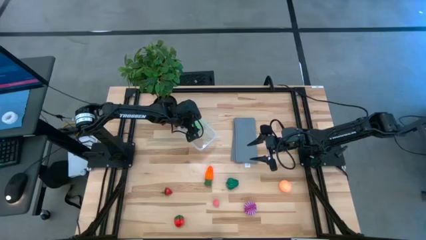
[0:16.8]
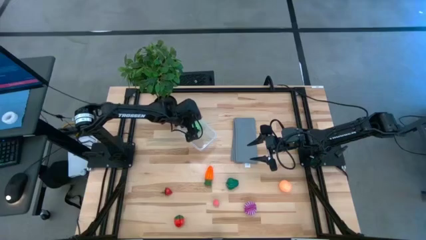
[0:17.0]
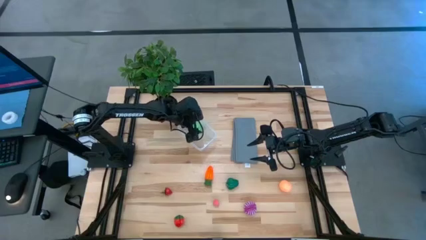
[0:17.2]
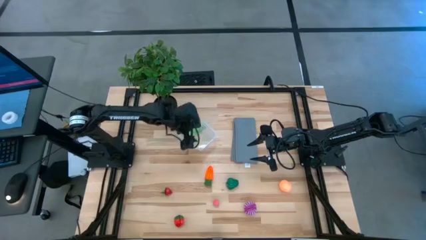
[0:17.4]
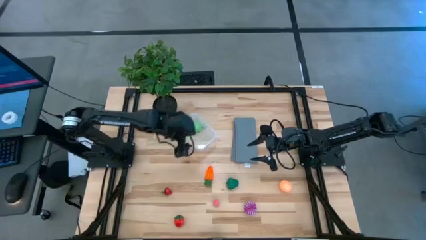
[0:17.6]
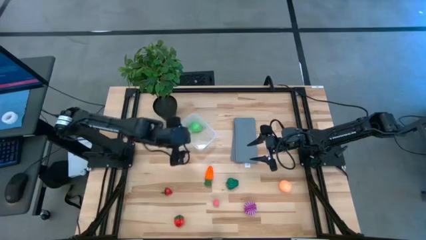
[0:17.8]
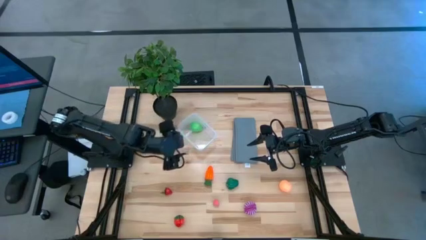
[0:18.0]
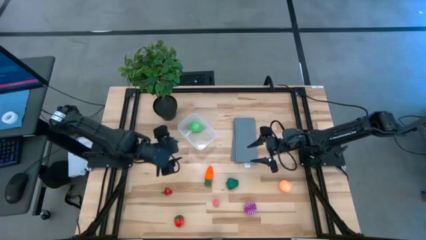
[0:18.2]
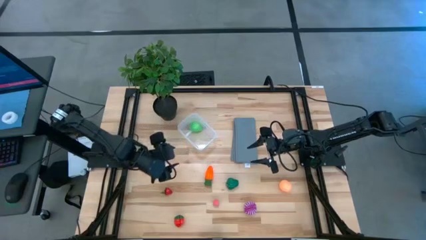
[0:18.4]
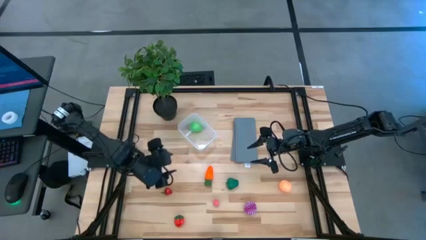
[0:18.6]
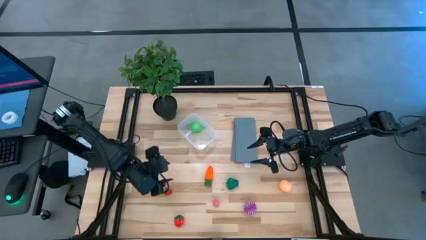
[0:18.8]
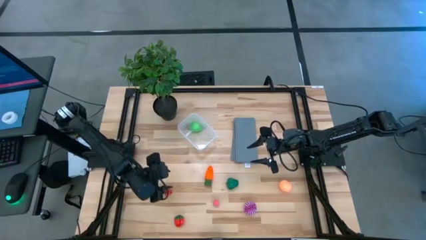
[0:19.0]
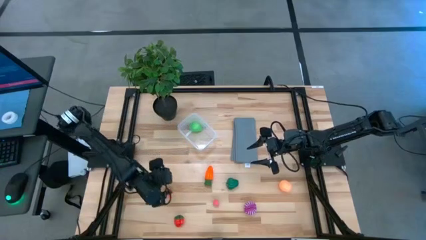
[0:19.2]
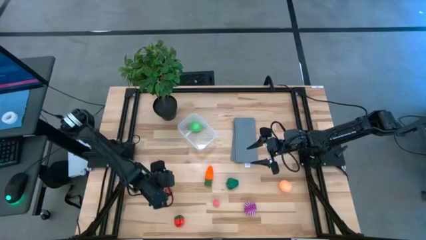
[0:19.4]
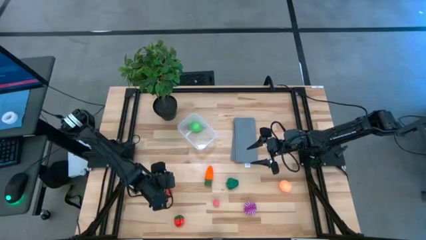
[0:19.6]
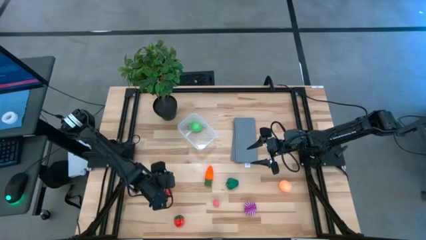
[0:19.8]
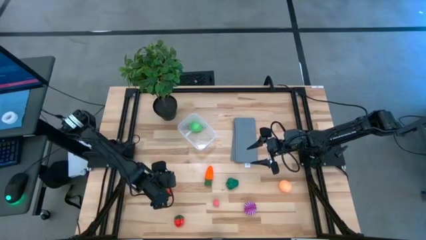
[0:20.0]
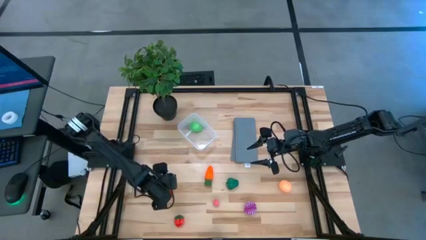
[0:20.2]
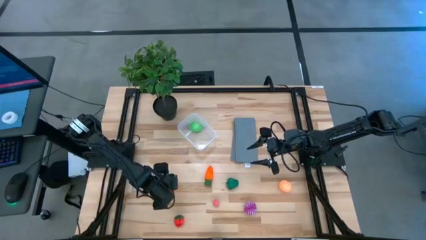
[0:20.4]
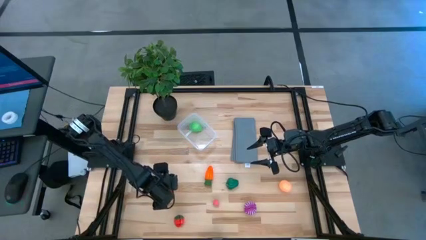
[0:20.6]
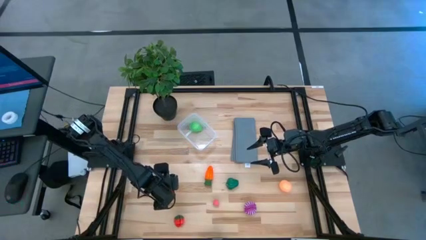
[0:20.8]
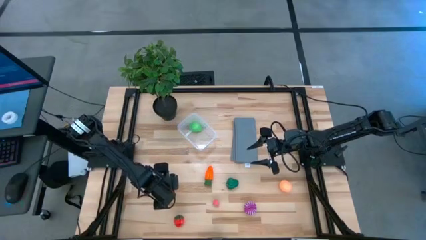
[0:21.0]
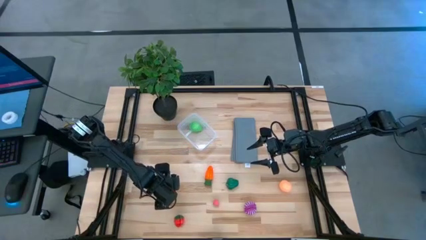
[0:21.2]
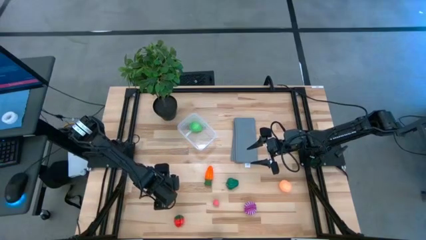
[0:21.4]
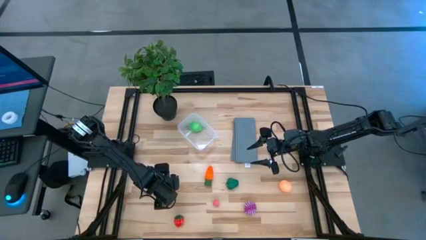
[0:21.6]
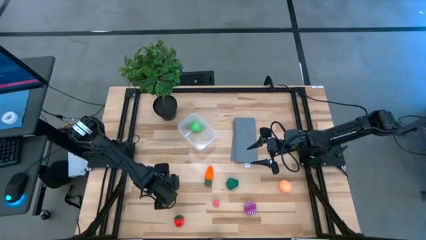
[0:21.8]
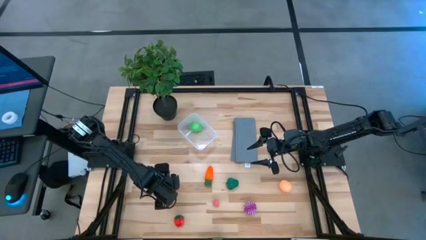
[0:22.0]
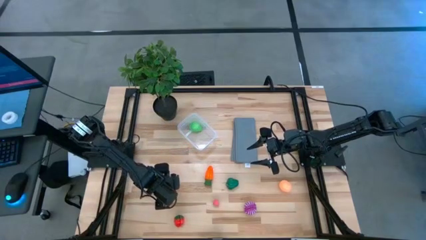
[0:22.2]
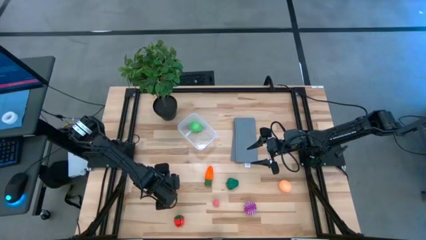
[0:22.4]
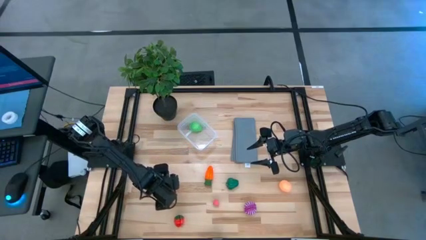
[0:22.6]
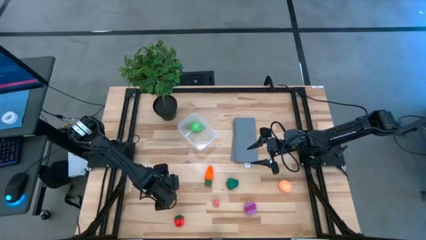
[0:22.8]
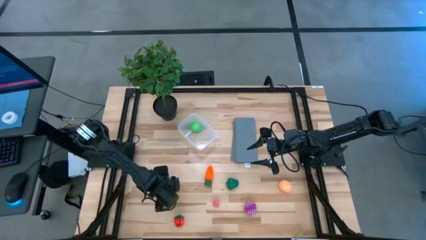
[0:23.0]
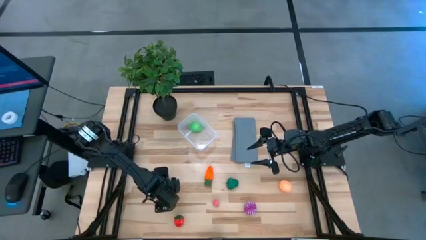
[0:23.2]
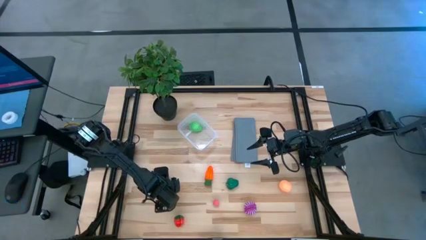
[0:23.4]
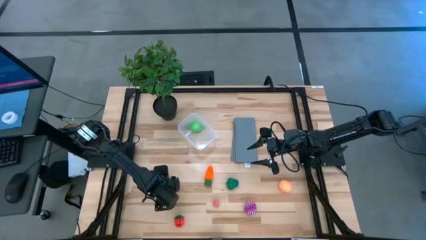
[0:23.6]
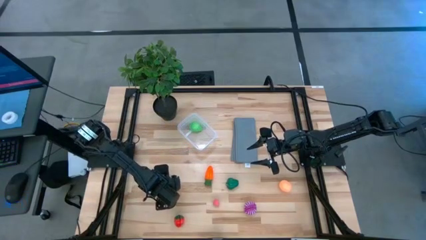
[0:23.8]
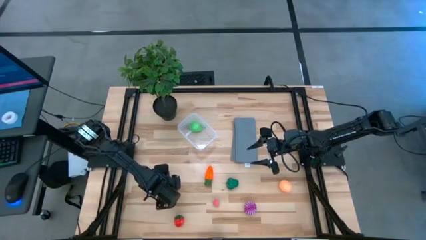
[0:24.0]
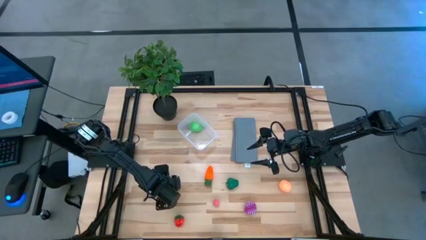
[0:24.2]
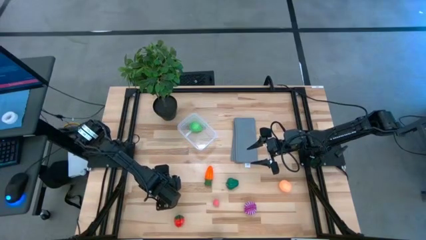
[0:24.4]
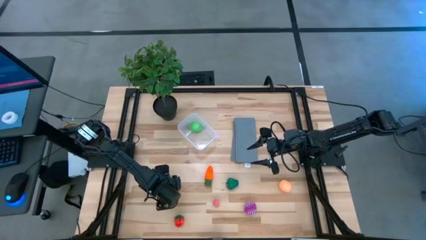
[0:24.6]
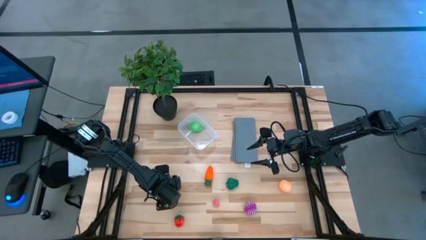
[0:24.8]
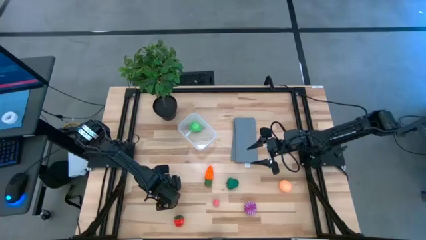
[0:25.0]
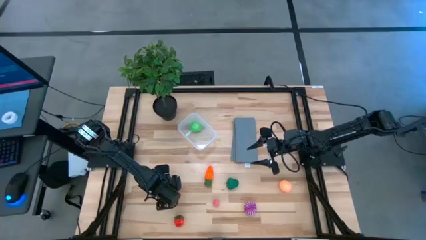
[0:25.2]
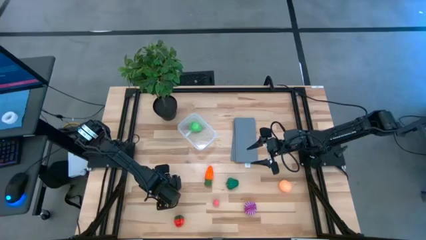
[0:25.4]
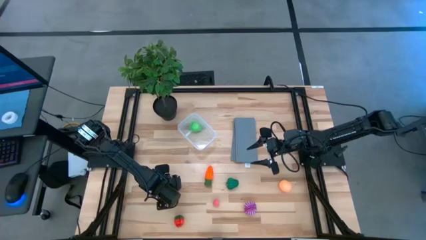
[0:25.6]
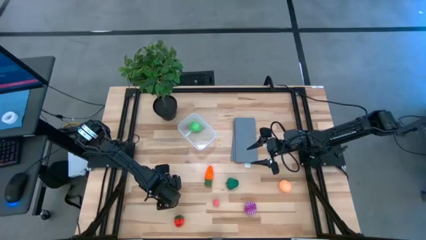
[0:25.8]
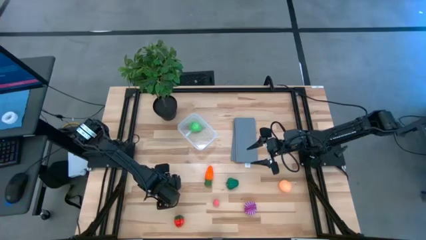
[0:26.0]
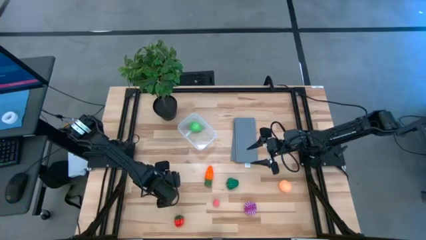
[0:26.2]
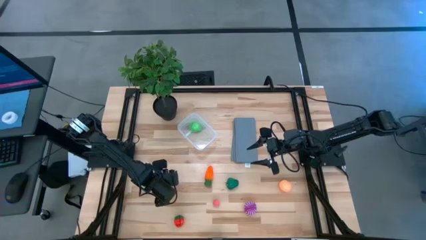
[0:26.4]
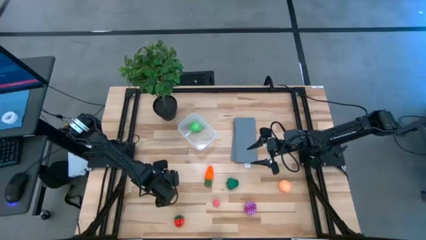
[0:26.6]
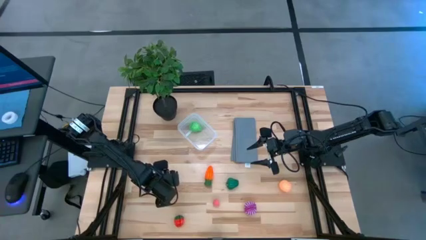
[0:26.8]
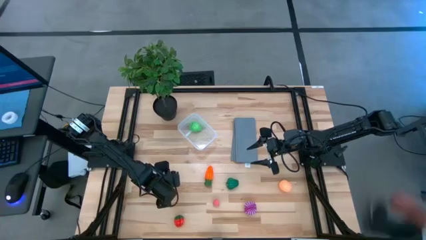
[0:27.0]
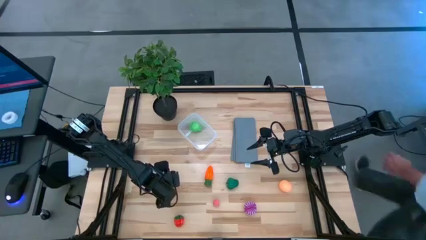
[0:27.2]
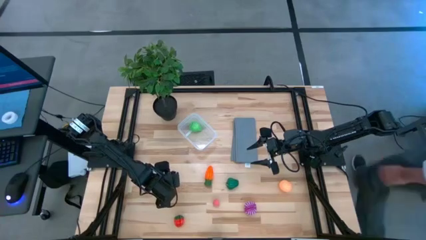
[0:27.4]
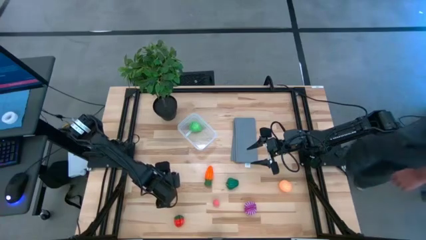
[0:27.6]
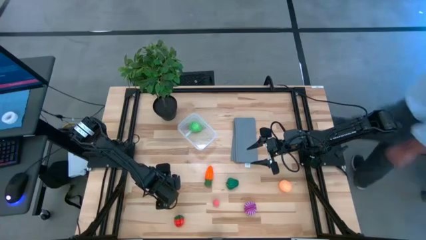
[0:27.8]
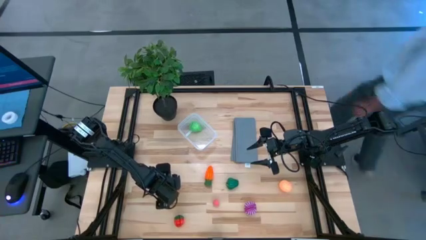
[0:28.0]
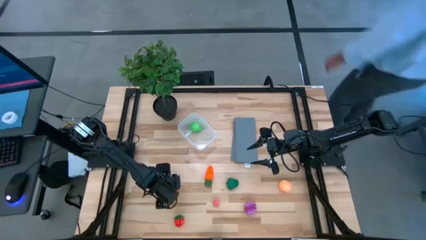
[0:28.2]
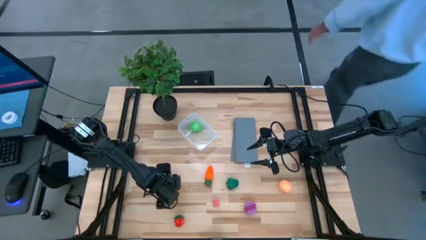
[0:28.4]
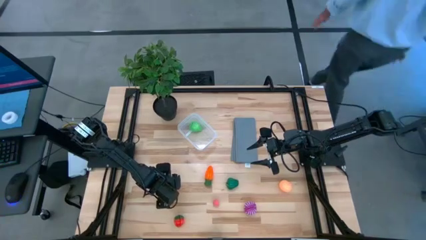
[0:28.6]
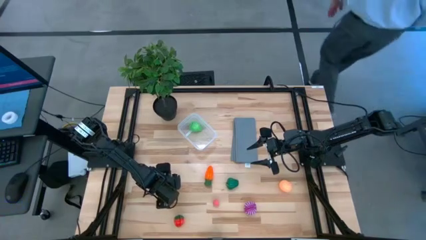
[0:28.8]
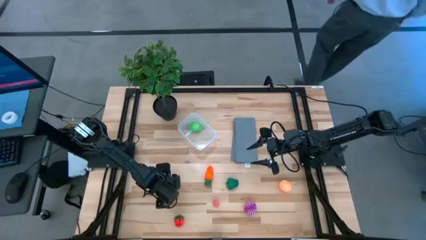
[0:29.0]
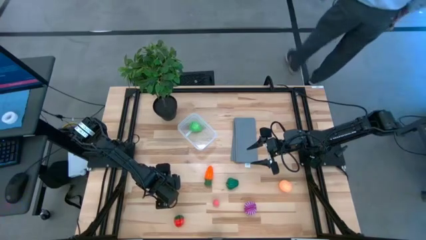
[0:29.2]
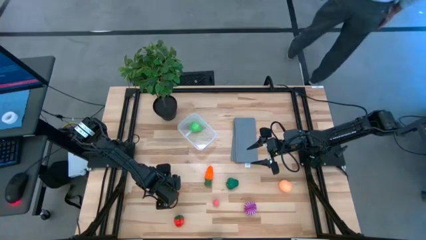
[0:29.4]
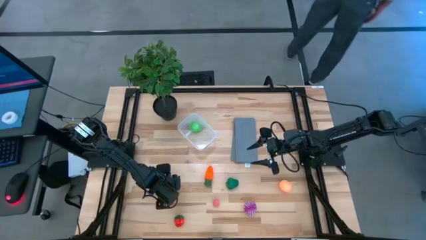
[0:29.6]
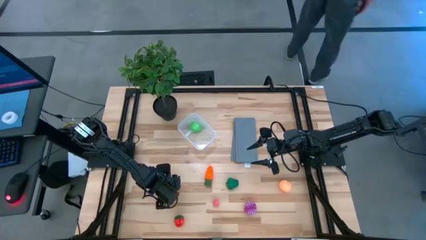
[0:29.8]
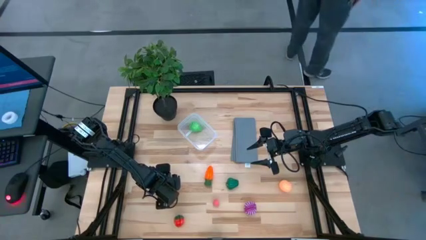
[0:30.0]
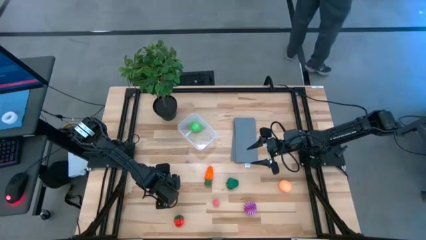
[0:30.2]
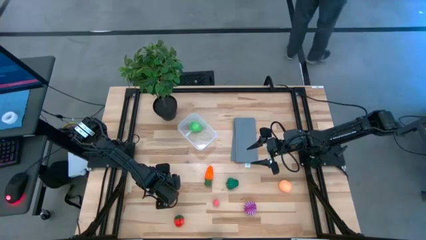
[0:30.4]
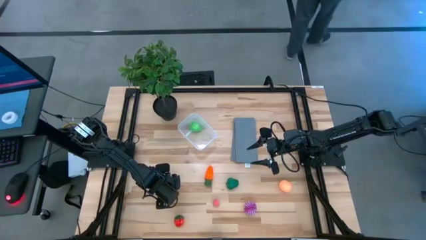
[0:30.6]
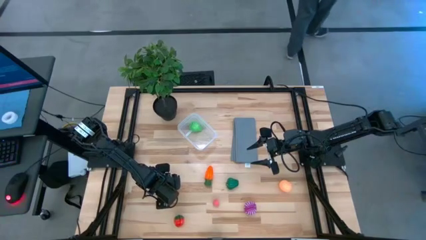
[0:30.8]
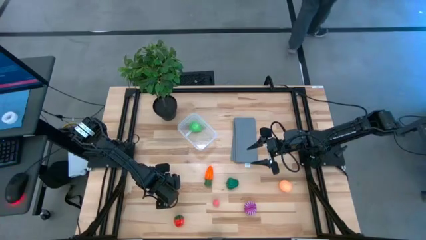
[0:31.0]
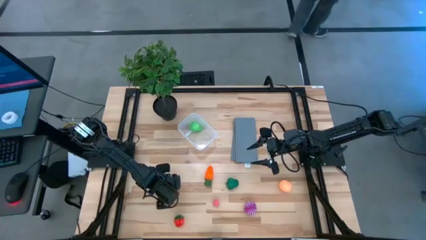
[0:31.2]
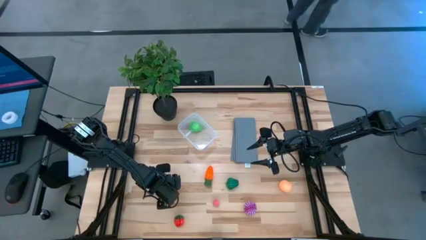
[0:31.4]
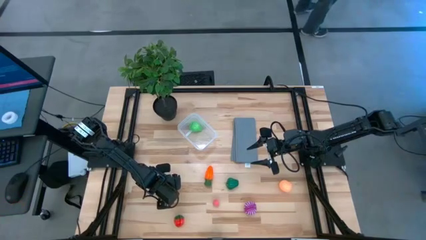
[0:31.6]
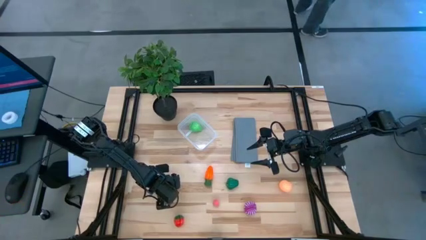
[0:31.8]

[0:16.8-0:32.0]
Task: Pick and placing Produce into tupperware
Put the red strawberry into the transparent bin

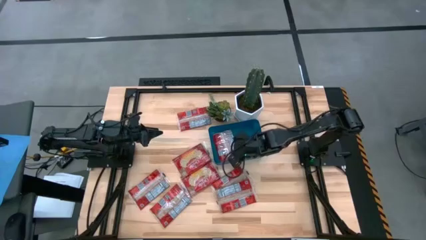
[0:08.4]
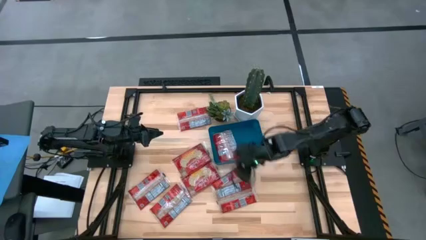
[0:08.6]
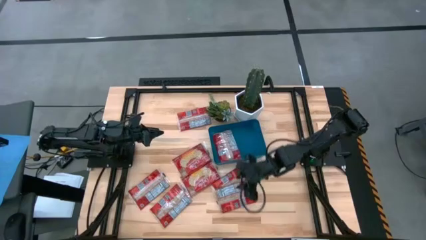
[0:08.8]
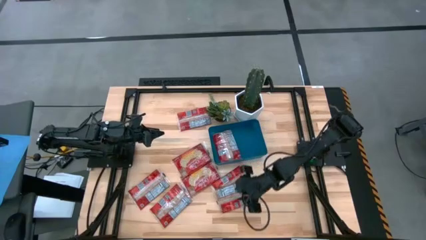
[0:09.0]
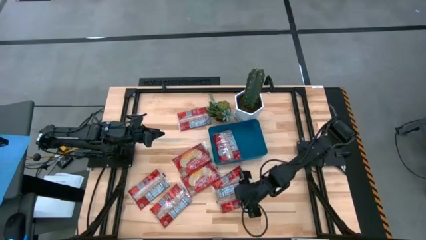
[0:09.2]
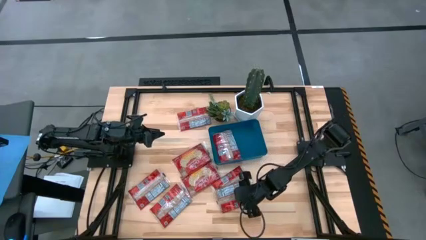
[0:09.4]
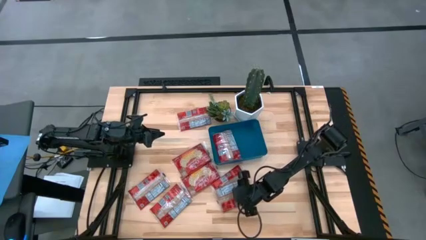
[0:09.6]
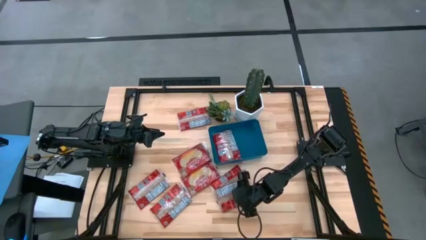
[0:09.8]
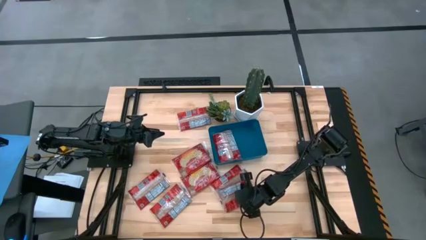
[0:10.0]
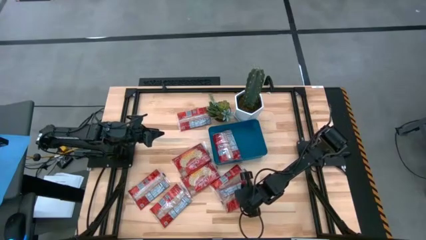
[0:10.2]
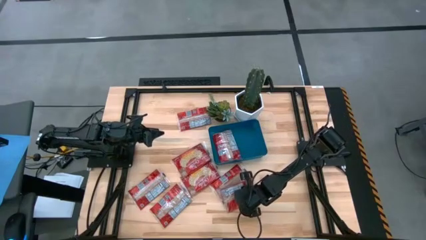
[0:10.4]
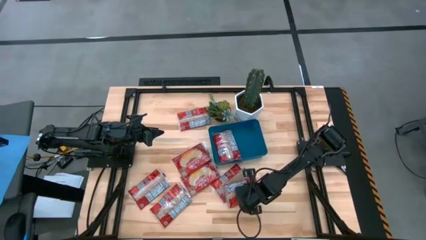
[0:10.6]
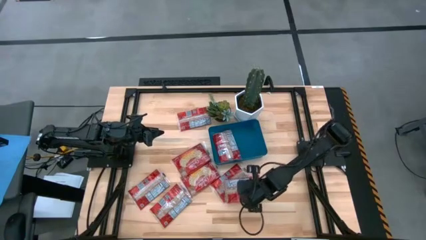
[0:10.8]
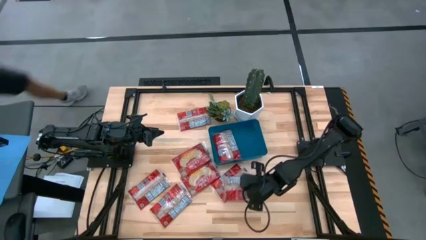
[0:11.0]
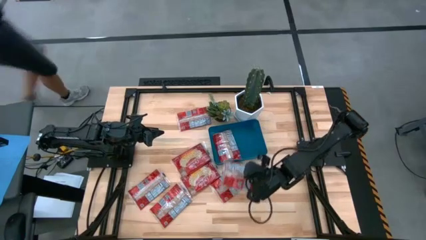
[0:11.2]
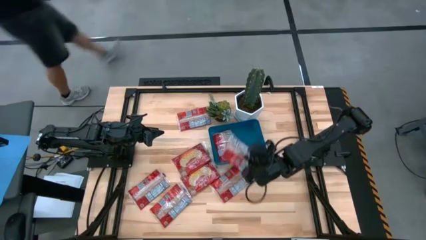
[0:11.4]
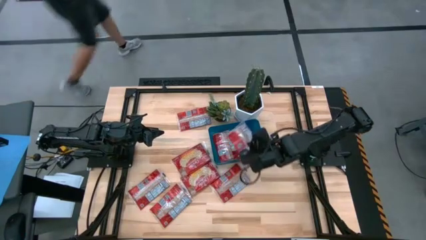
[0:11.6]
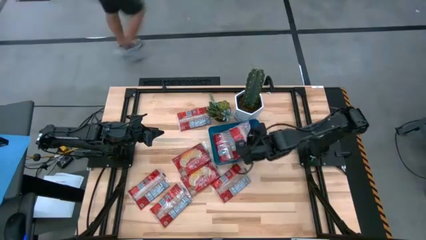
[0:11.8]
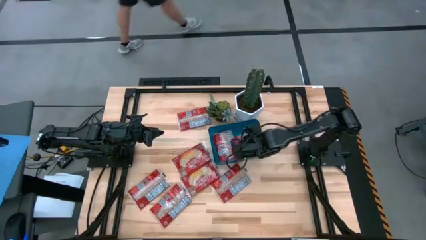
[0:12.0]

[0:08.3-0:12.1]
Task: Sort popcorn bags into baskets
Put the red popcorn bag into the blue container
